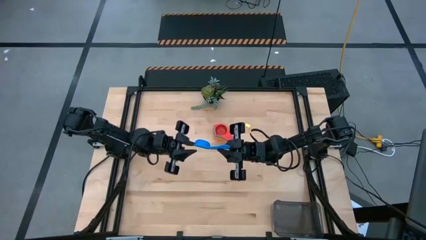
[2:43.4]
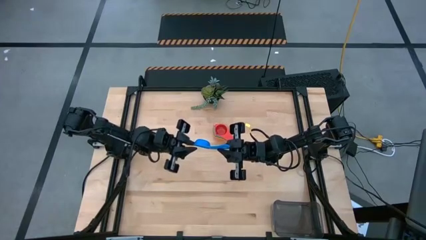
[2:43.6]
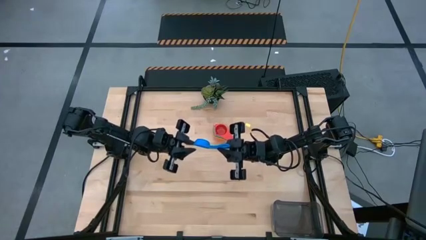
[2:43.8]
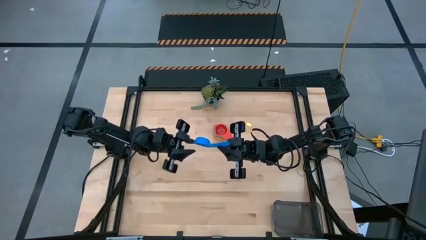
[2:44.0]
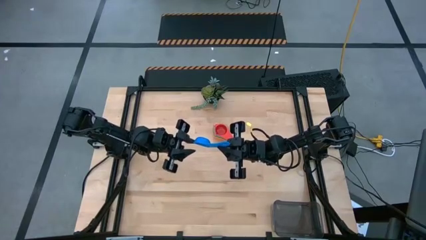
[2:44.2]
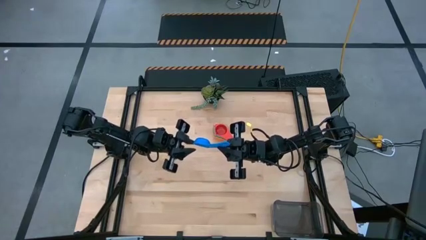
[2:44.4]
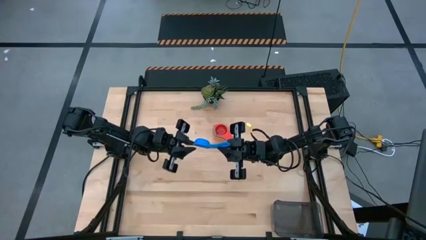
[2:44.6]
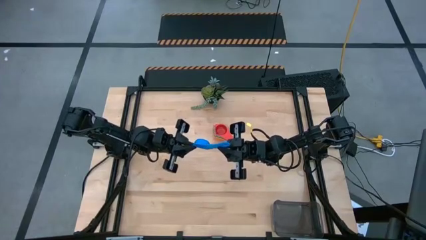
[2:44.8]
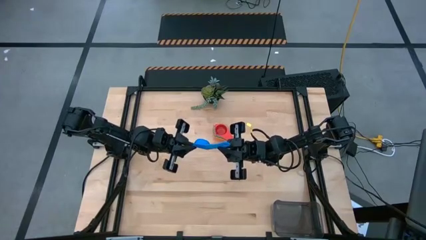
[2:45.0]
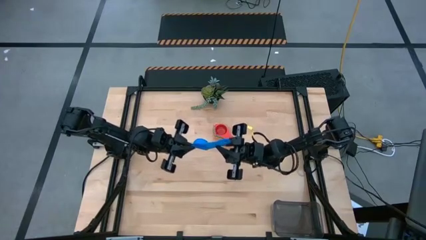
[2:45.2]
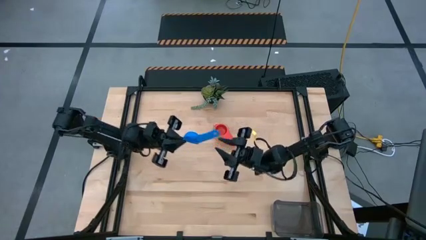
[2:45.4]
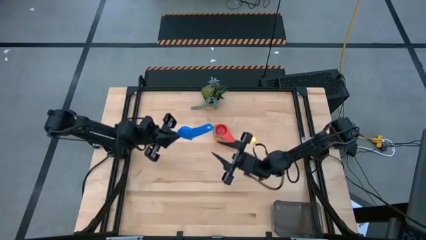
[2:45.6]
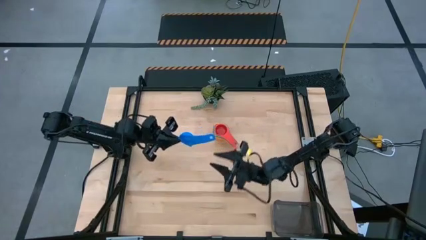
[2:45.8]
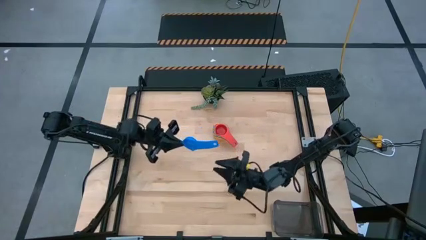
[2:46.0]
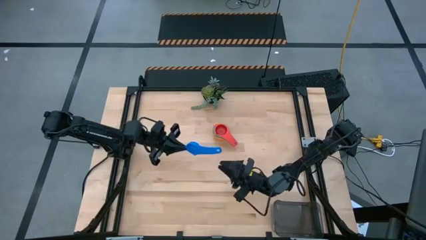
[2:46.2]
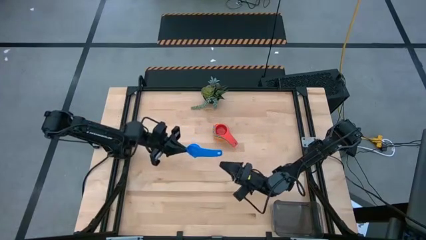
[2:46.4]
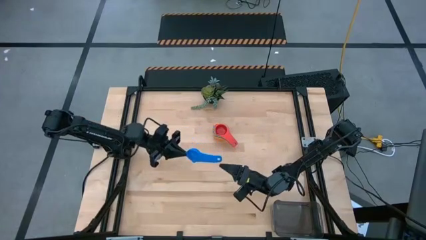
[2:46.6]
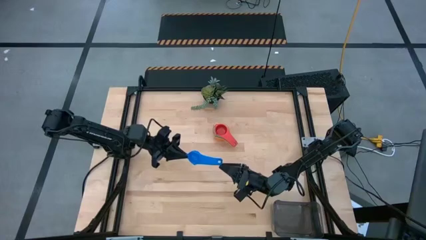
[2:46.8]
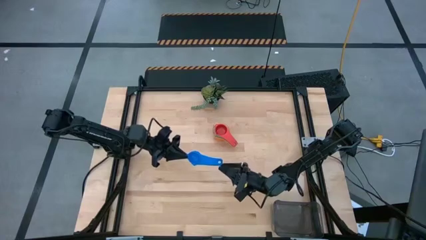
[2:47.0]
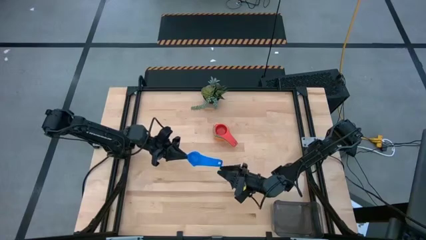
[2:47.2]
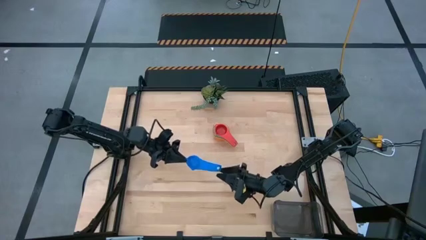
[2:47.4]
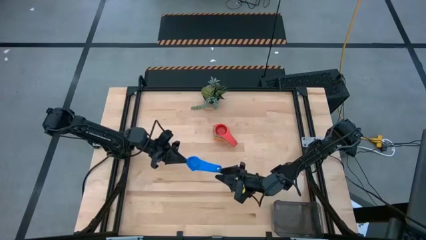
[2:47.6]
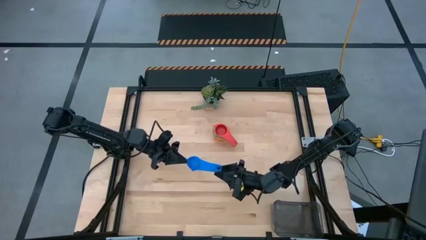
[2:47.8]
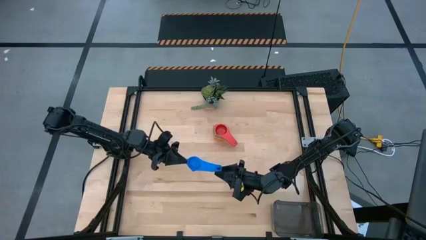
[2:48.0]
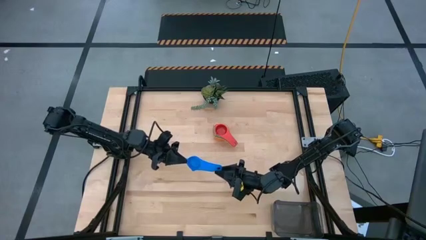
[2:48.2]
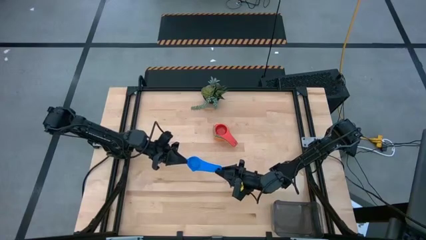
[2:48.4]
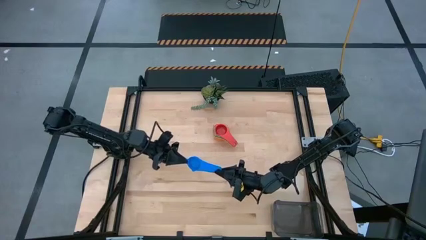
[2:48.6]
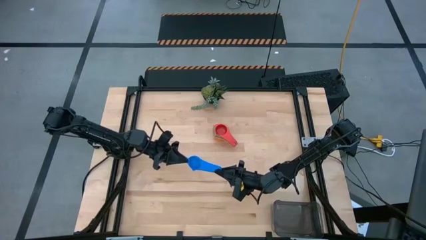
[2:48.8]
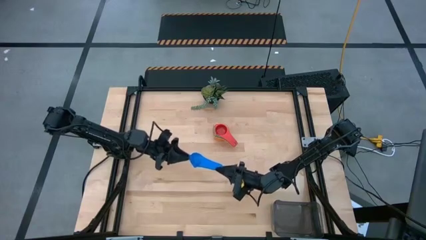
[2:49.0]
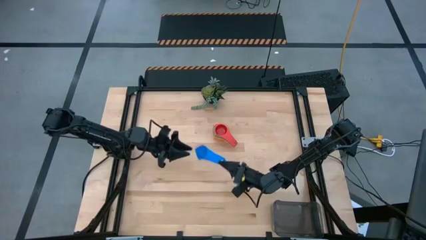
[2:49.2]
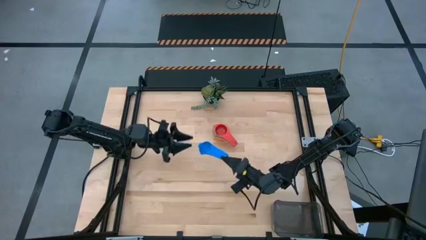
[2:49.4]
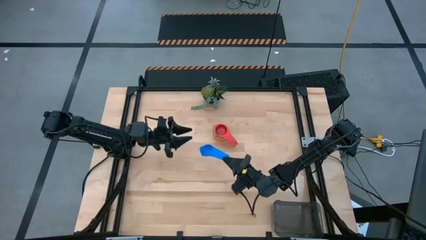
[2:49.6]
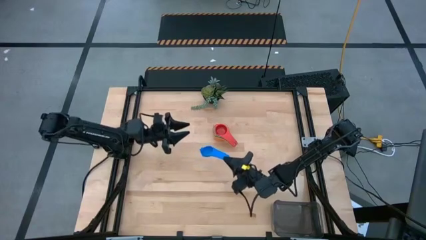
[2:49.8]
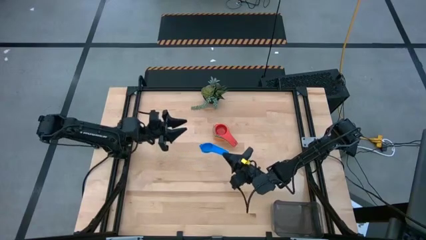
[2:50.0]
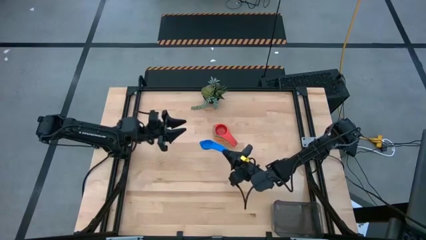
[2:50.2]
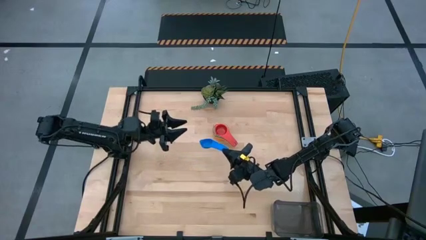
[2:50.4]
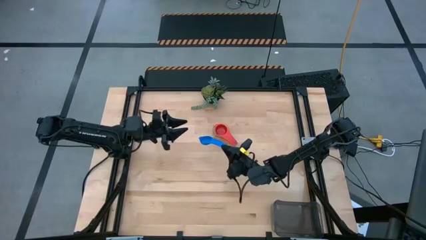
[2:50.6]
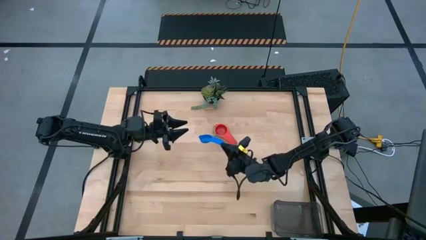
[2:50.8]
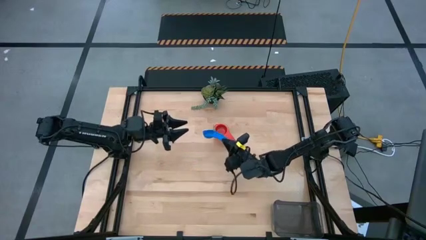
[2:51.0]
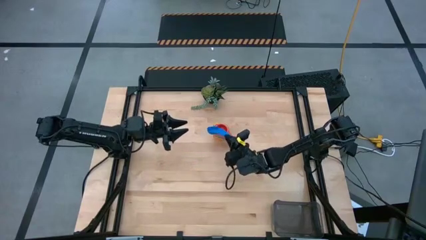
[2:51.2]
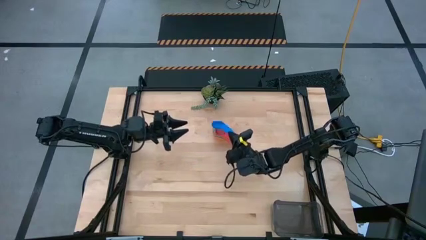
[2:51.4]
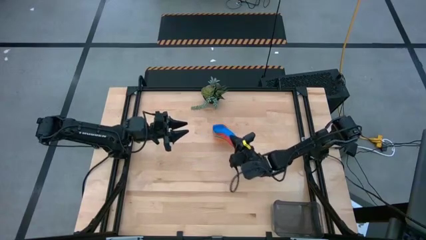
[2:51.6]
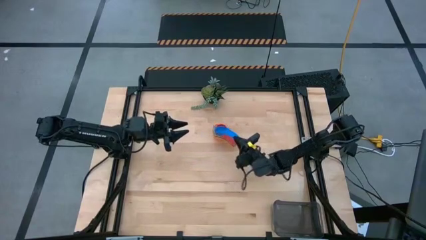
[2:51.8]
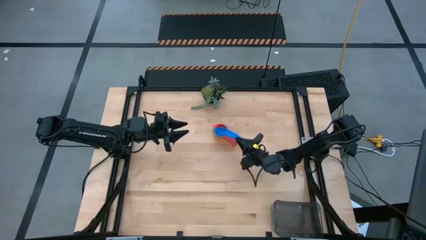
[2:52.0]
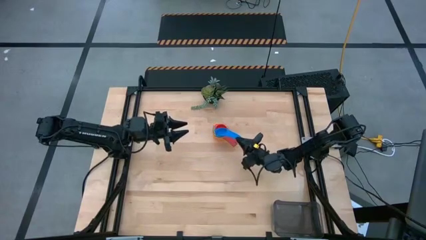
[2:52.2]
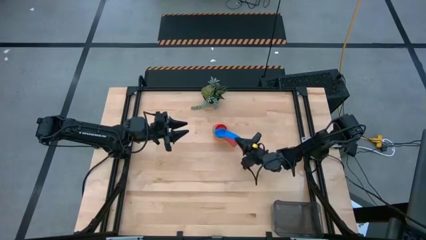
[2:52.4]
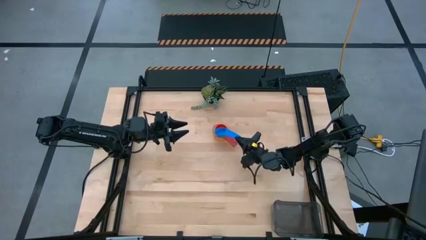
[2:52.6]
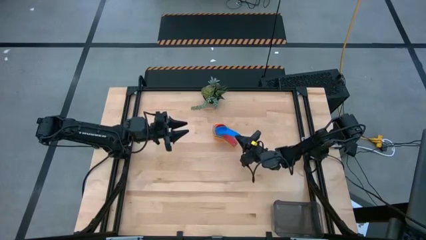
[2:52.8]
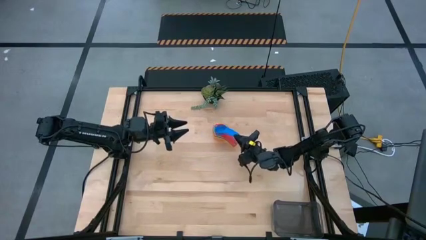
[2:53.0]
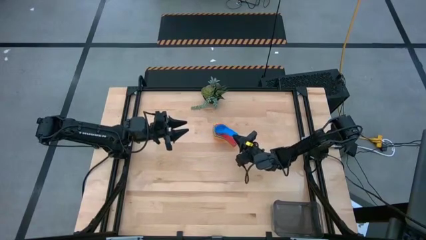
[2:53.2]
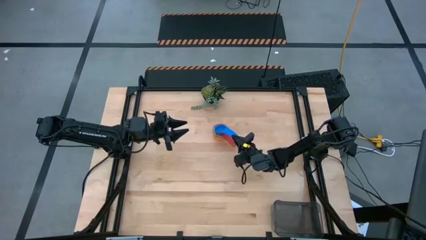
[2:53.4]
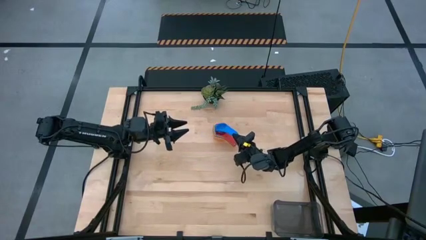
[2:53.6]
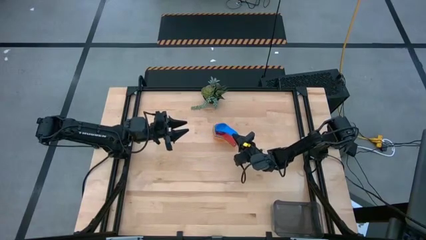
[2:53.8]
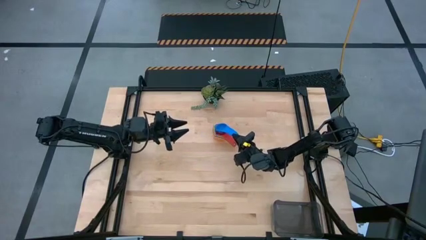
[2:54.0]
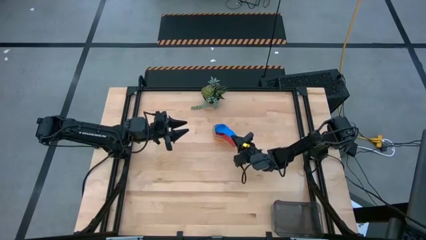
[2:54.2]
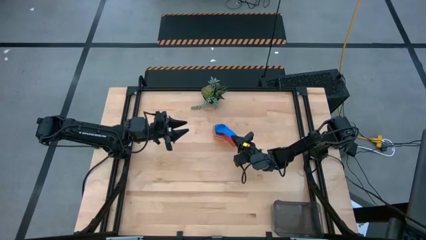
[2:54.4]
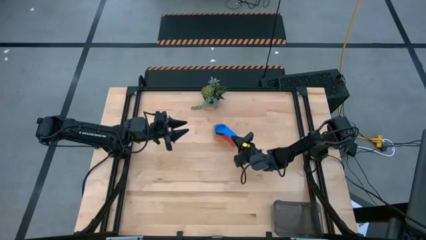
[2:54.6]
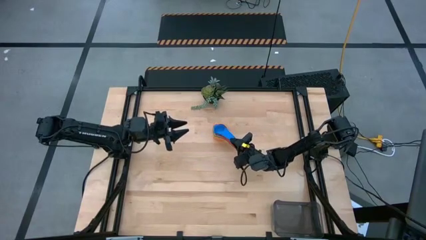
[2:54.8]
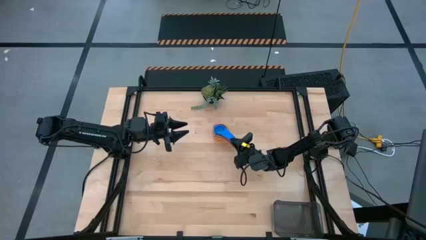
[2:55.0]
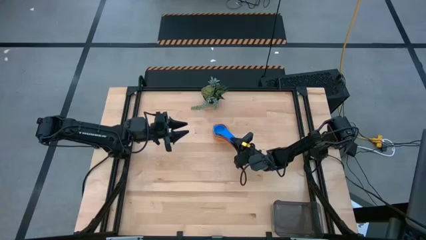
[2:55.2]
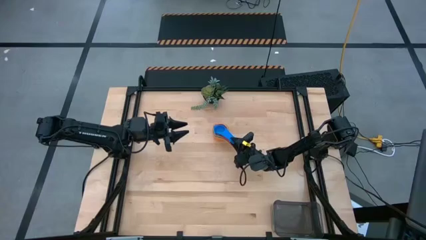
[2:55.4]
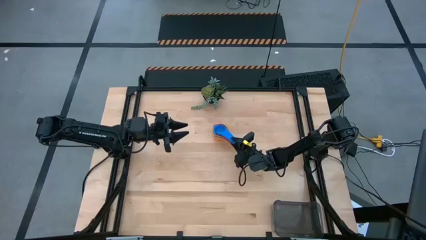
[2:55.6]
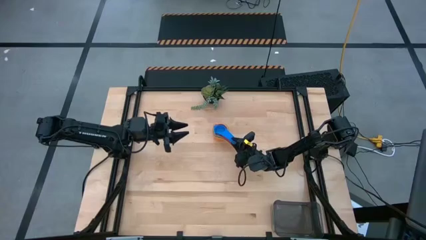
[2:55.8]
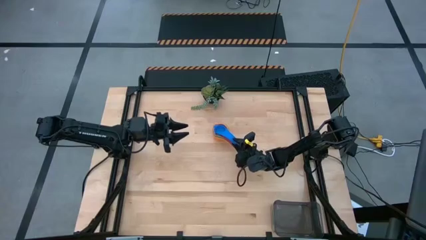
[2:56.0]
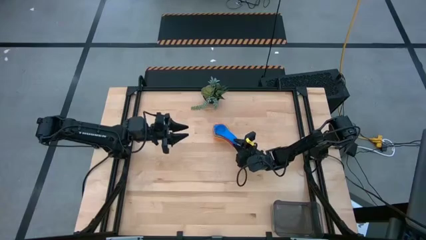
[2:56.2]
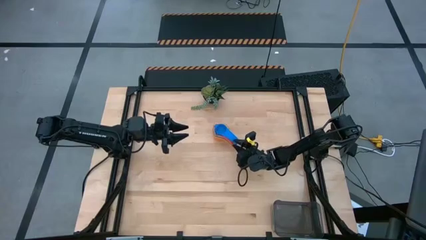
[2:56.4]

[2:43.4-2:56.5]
Task: Nest measuring cups in basket
Stack the blue measuring cup on top of the red measuring cup

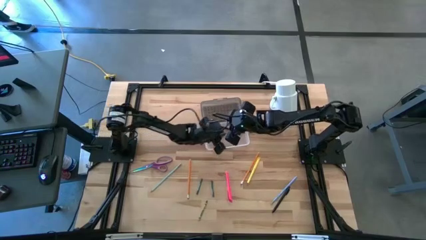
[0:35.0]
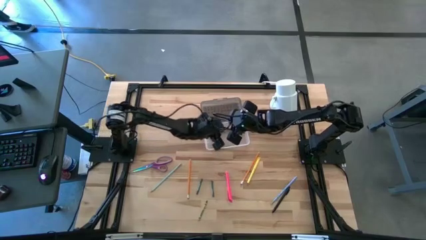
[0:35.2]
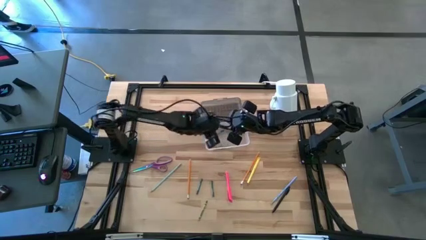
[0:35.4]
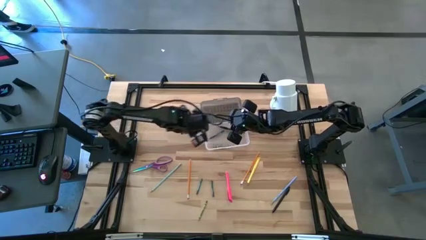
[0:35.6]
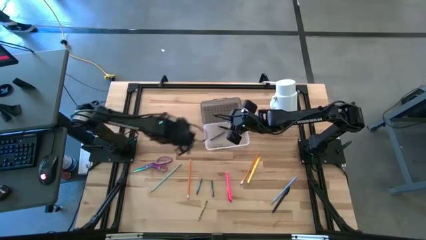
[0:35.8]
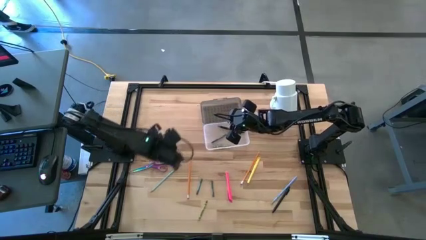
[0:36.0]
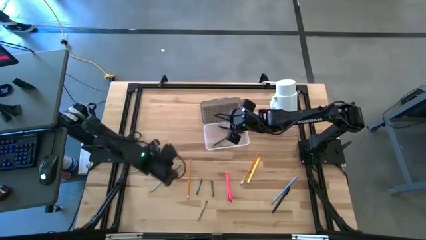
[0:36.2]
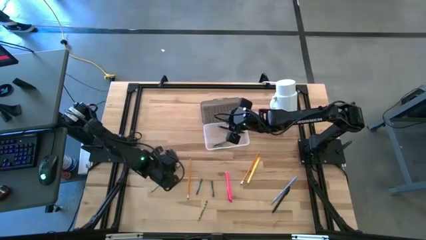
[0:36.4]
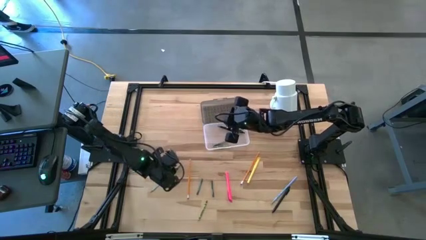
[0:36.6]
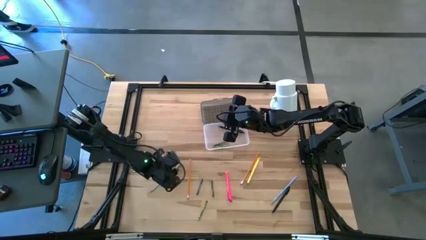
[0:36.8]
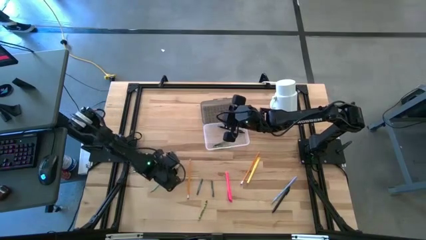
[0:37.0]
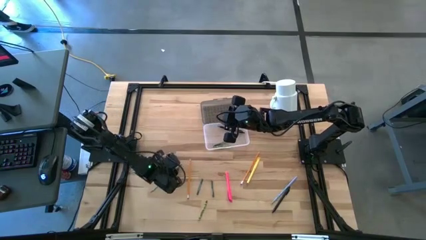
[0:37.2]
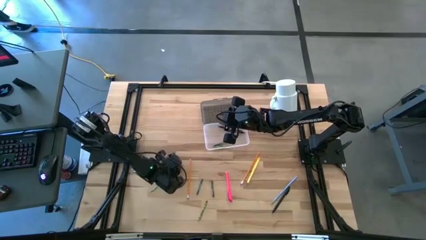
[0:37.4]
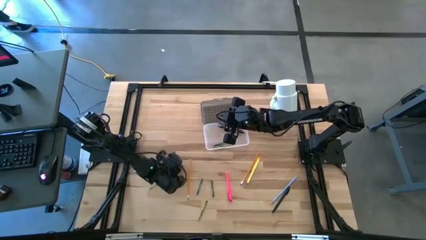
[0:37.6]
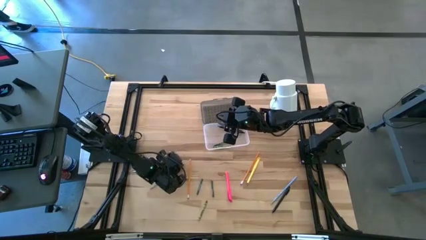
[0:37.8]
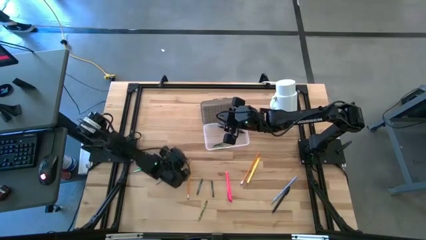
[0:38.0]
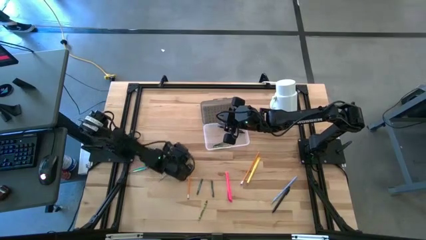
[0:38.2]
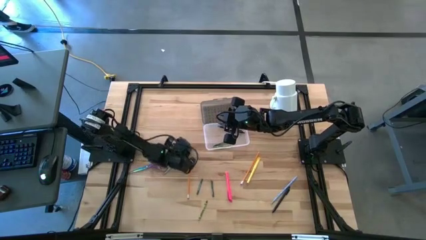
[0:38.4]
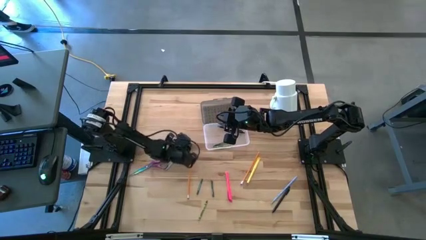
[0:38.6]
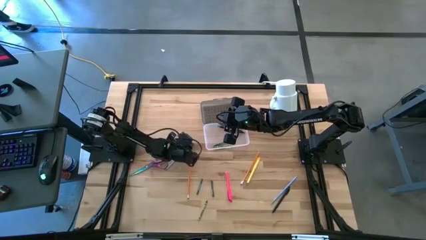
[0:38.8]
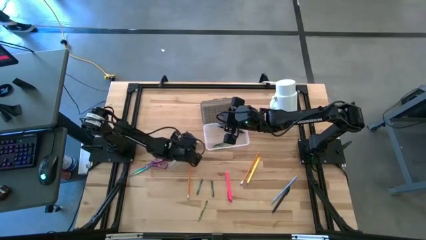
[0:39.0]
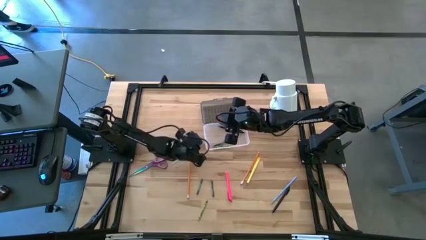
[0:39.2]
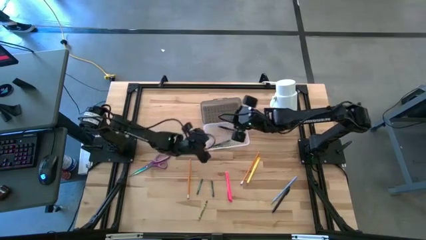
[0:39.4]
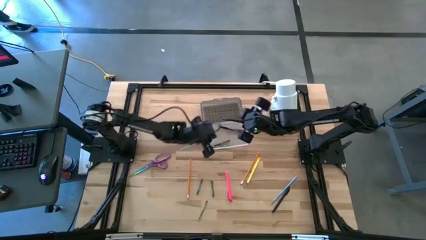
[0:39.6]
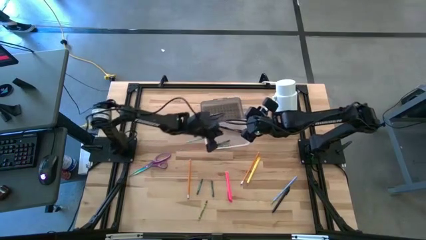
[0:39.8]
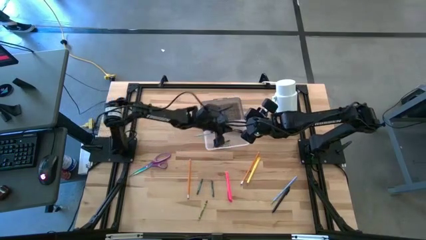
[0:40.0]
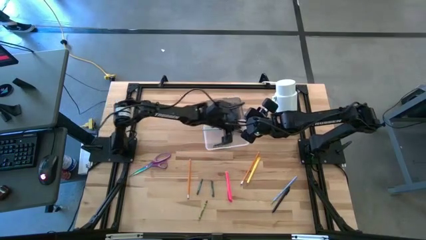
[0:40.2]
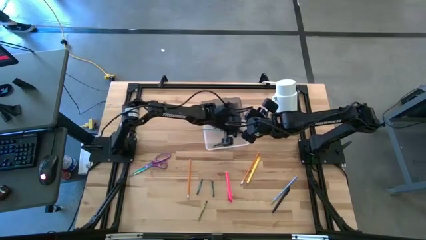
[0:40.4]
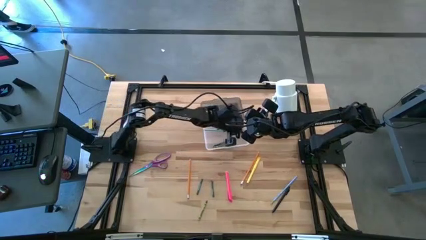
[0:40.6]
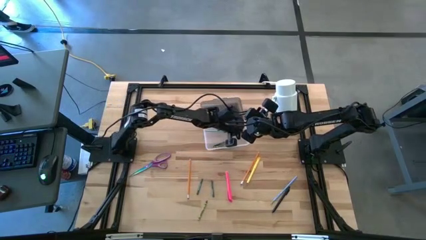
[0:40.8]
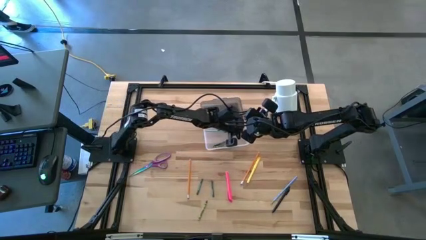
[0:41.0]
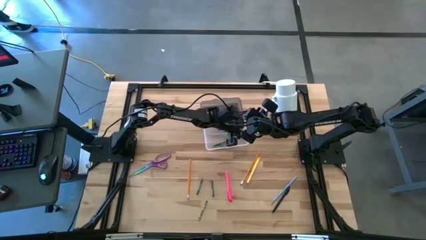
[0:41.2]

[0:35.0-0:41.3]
Task: Pick & place school supplies into a supply box
Put the light blue pencil into the gray supply box
